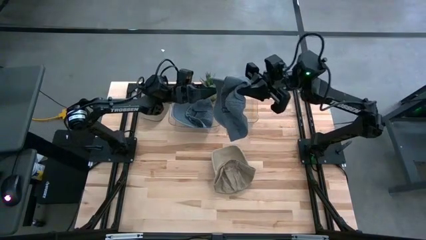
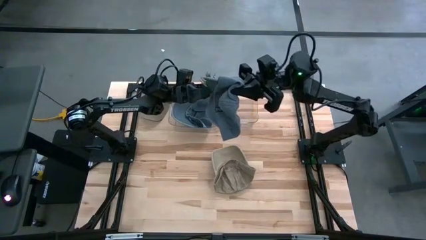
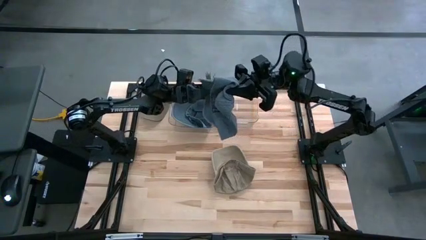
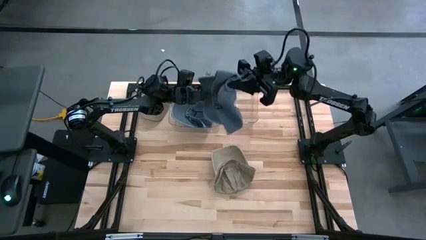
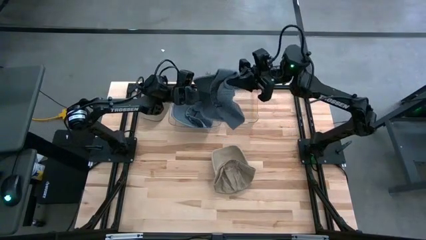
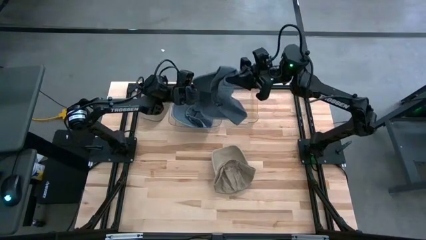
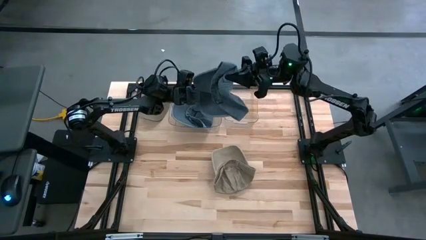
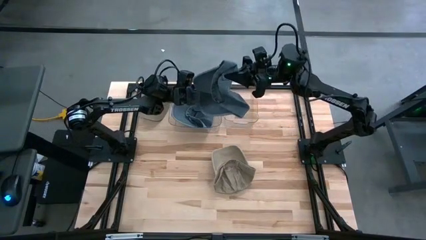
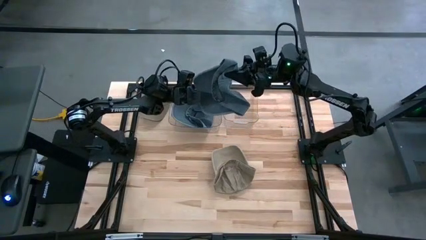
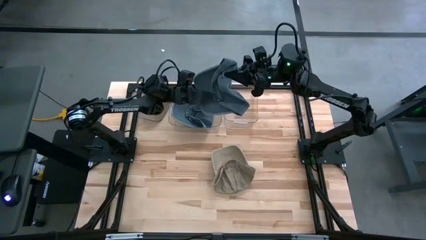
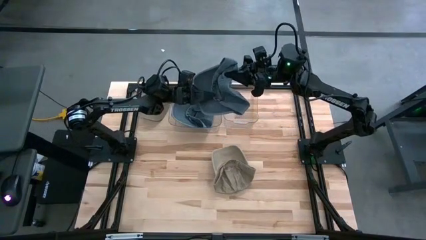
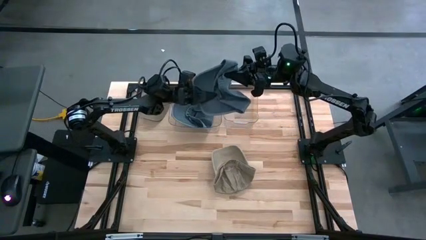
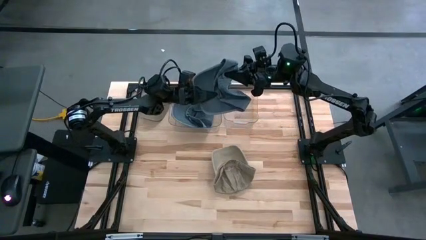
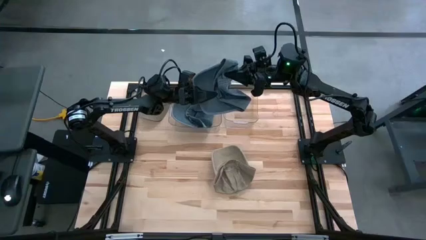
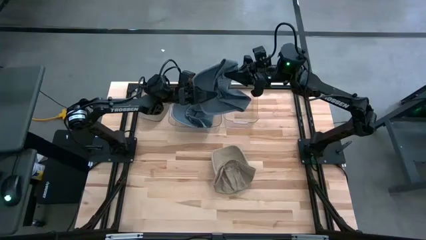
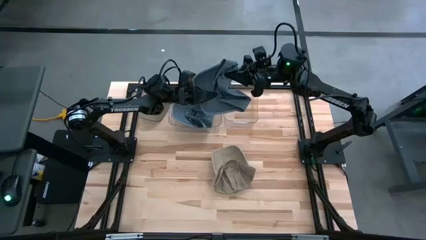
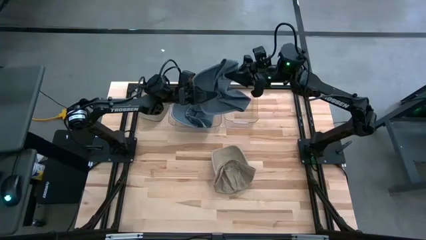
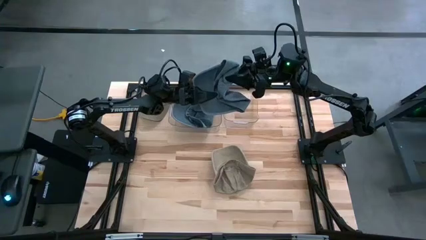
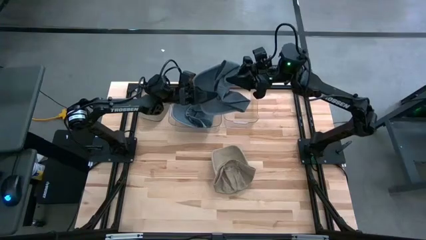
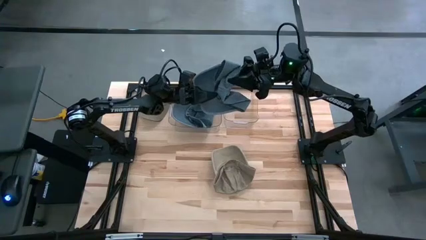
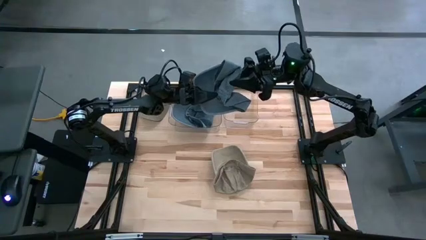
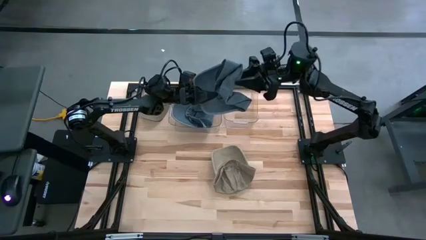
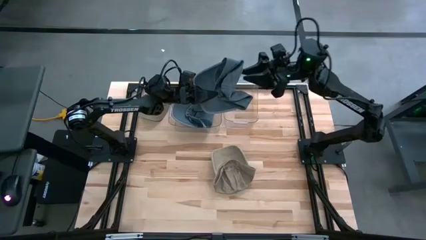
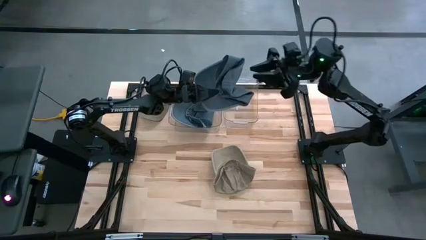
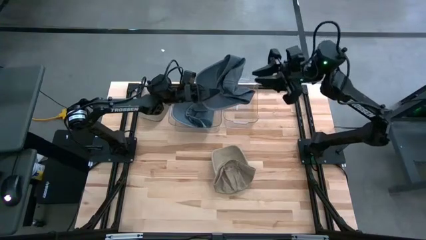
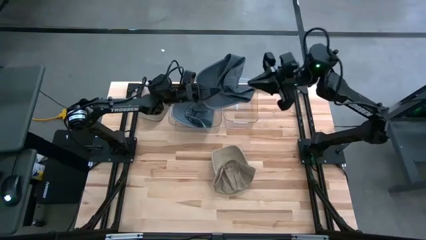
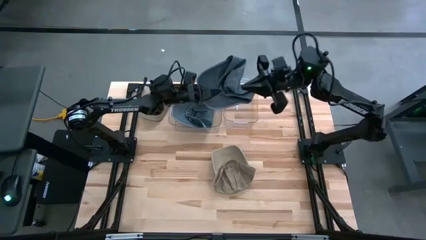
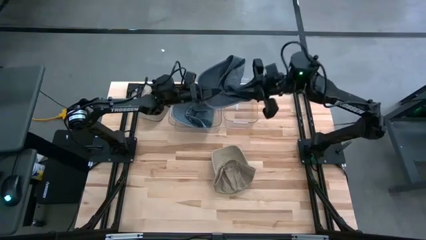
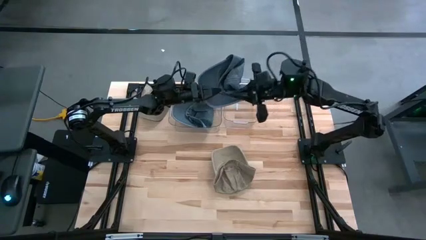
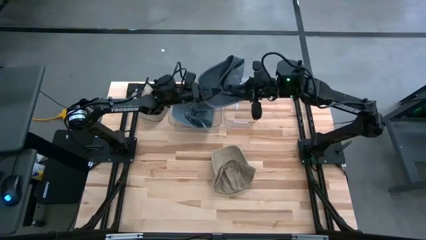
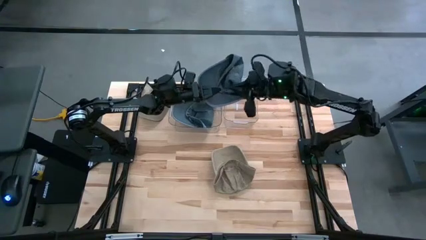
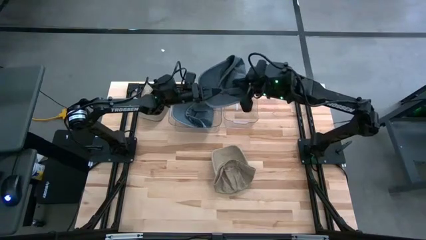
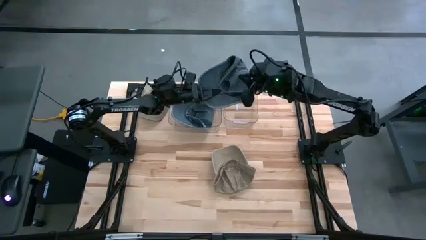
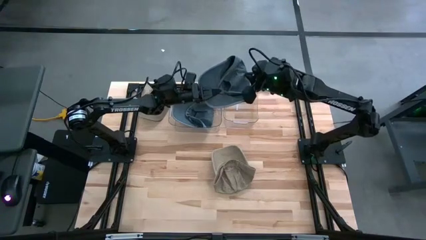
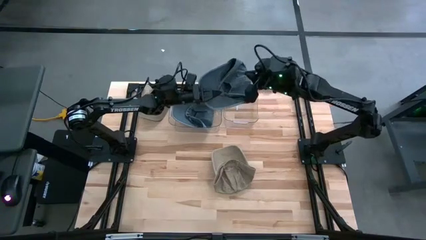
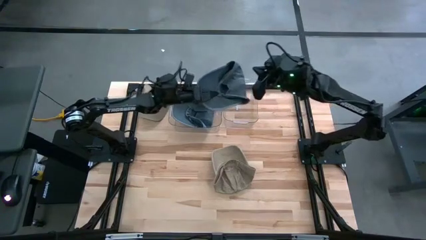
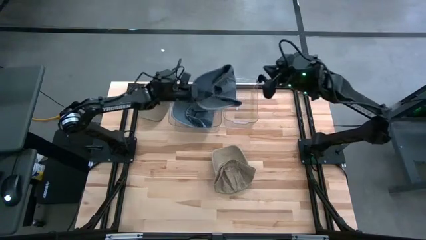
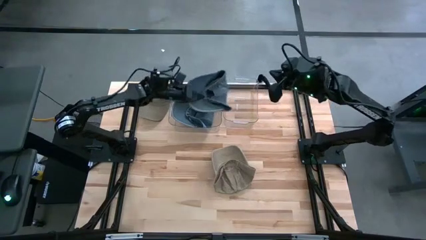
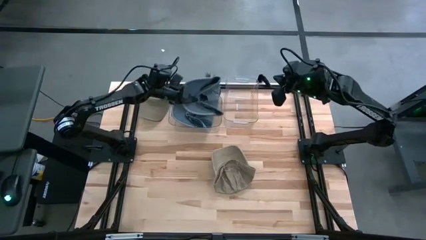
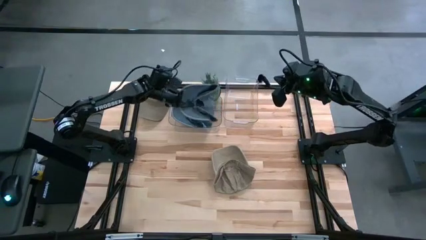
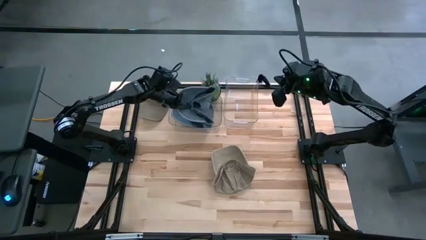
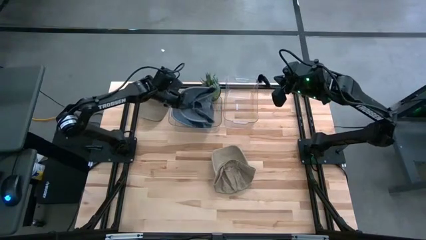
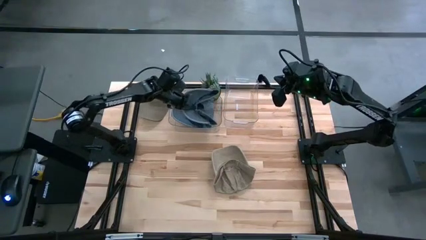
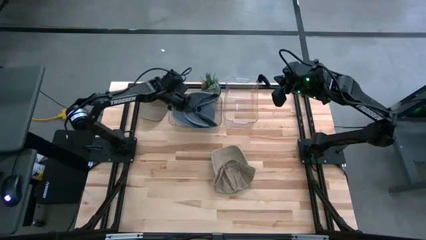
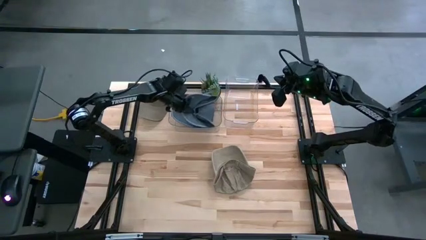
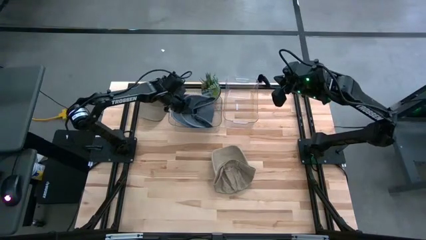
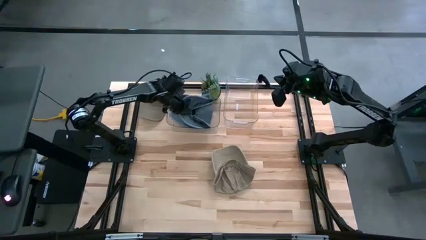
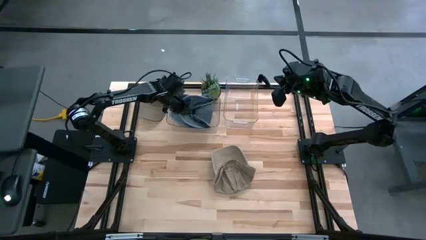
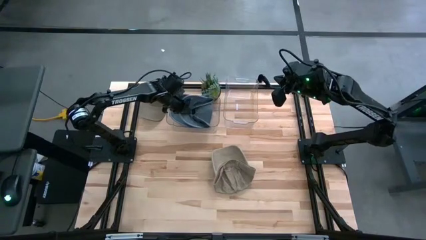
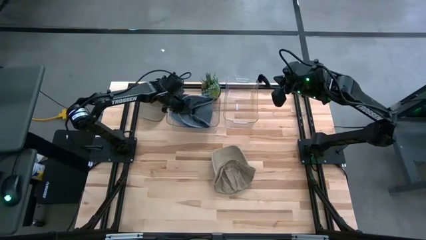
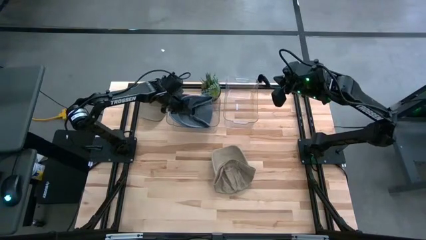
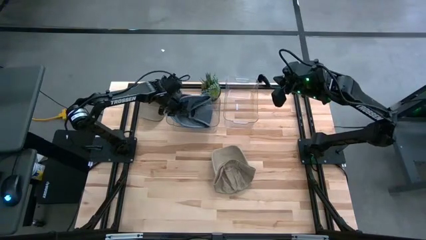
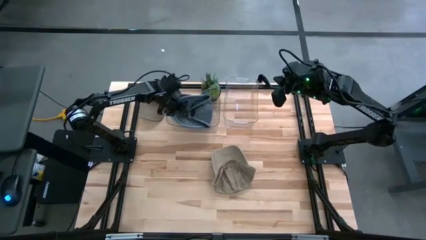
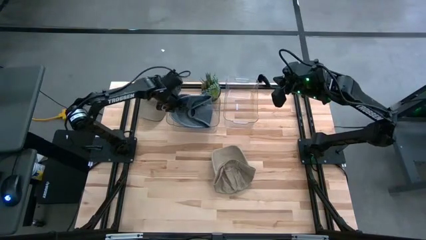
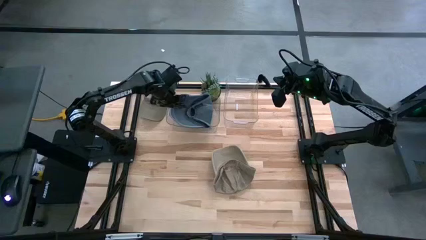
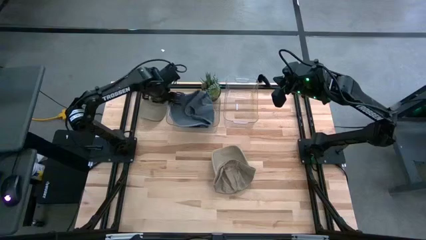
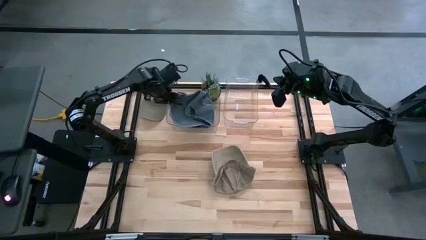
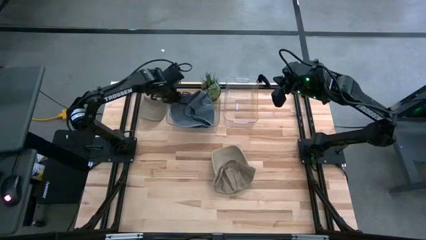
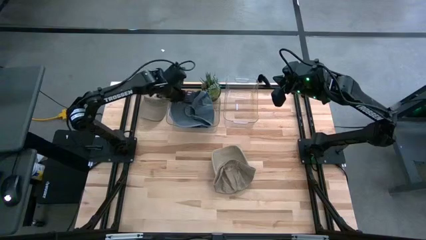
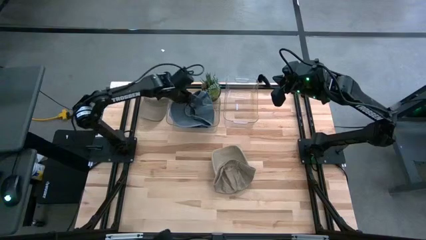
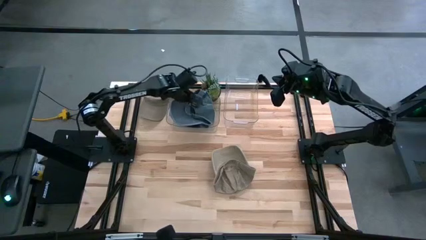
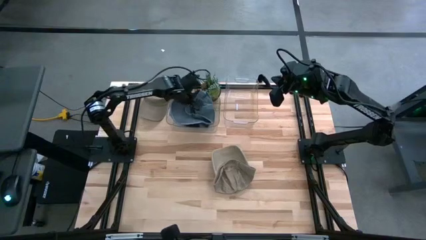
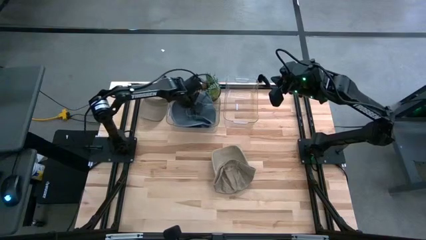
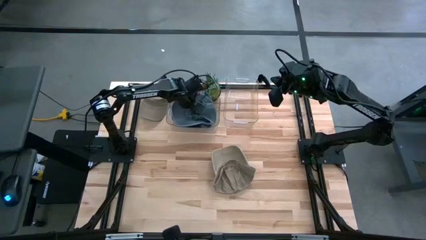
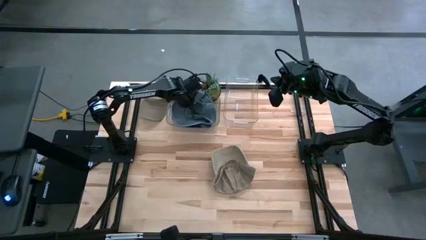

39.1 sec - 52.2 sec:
Task: Pick & Place hat
Put the gray cap into the left transparent bin

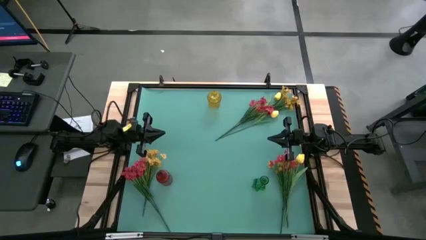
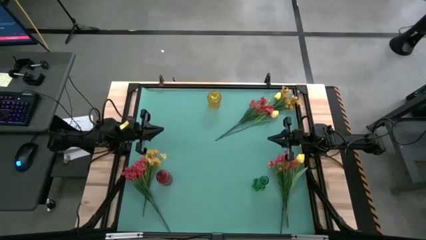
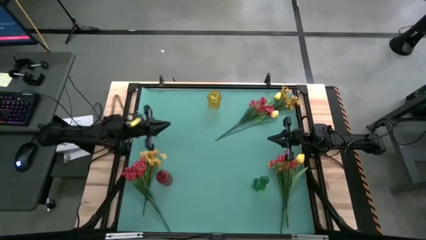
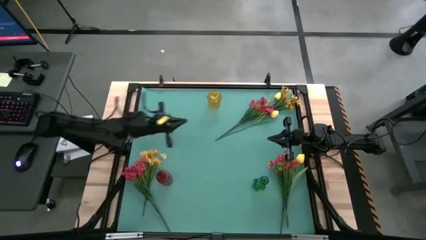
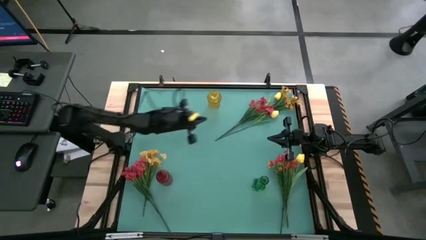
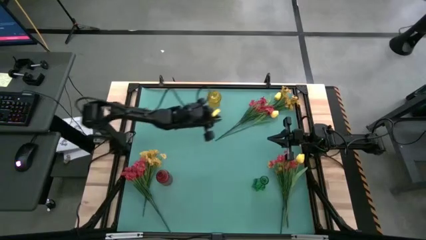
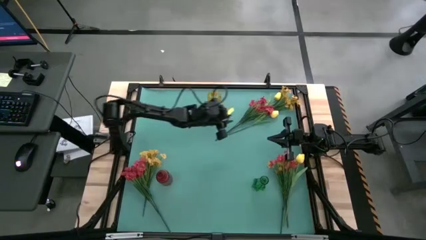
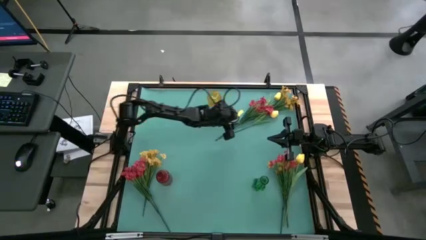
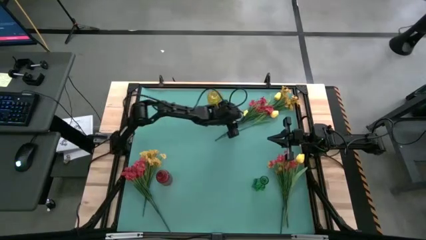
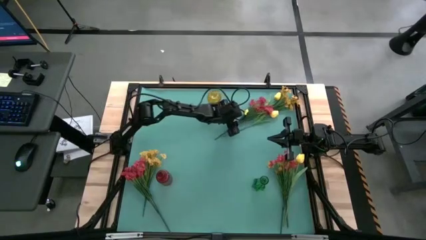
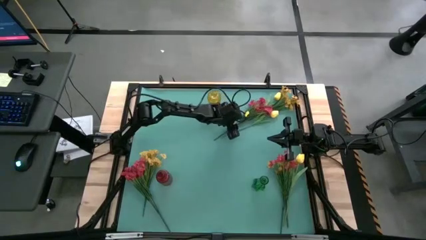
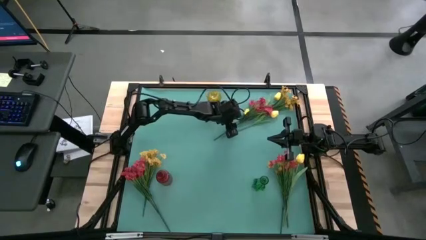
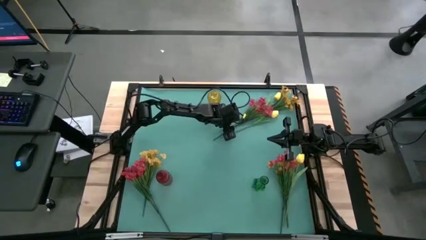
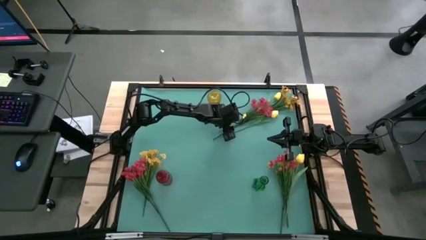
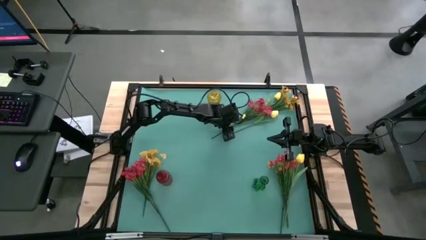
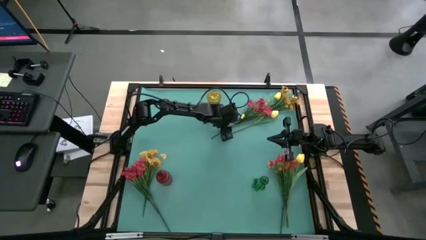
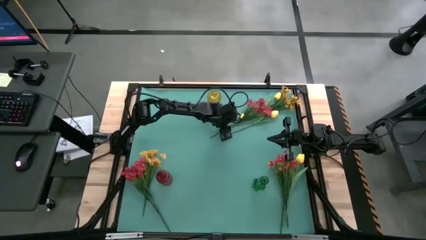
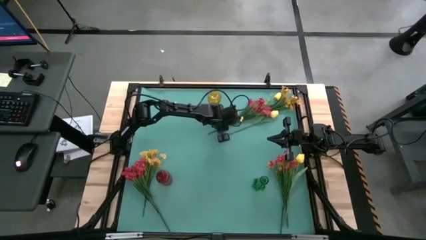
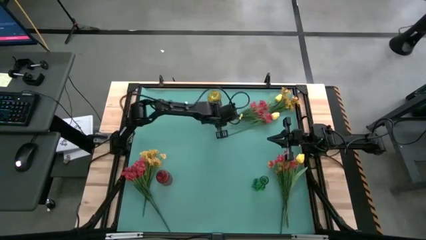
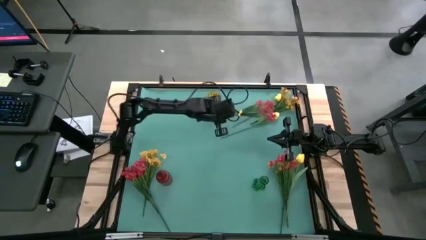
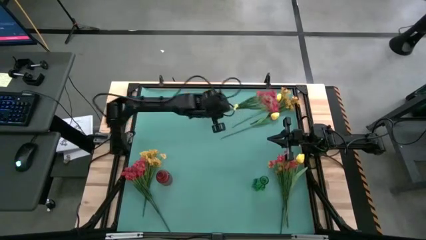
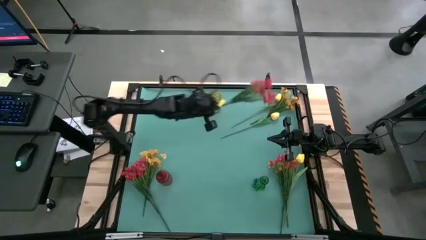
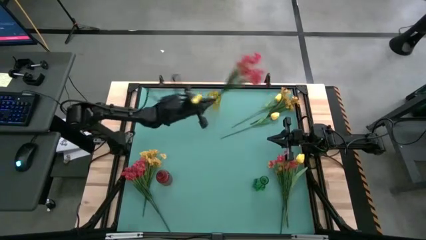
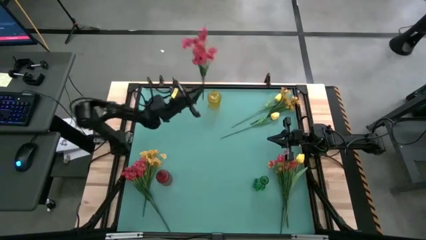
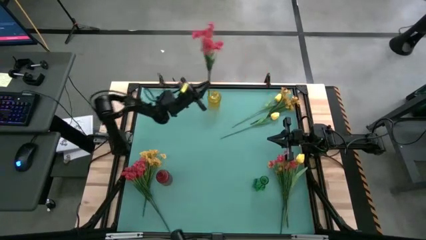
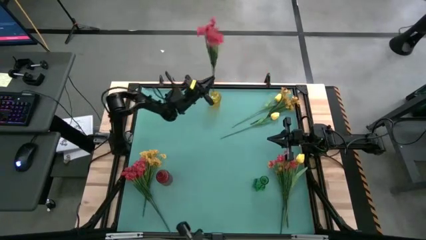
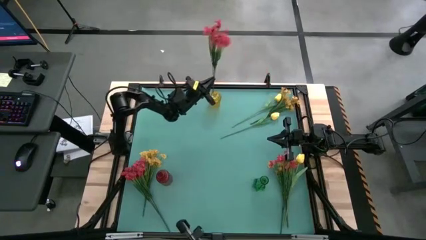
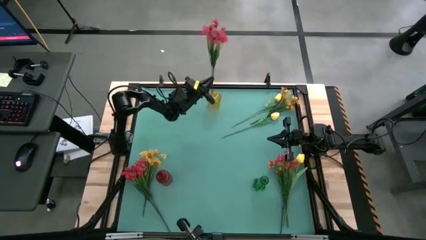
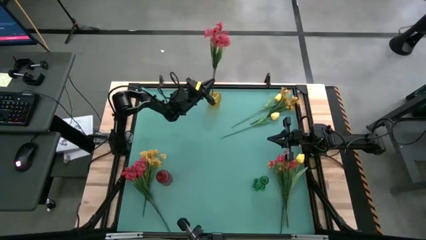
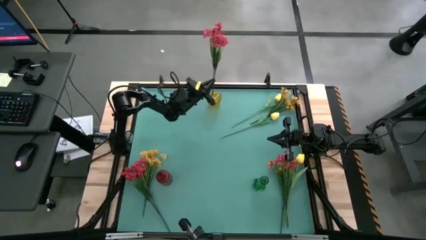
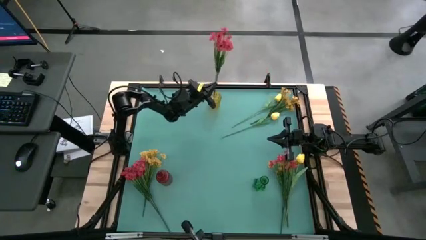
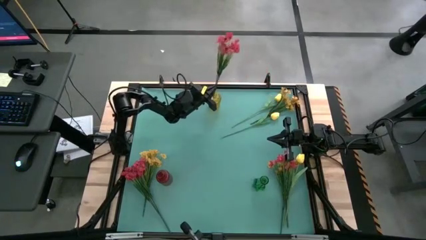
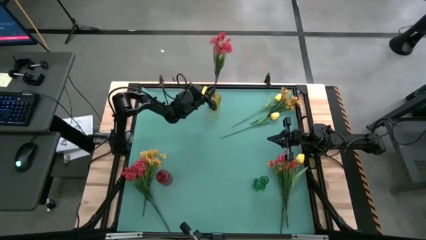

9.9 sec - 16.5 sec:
Task: Sort flowers into vase by color
Put the top red flowers into the yellow vase
